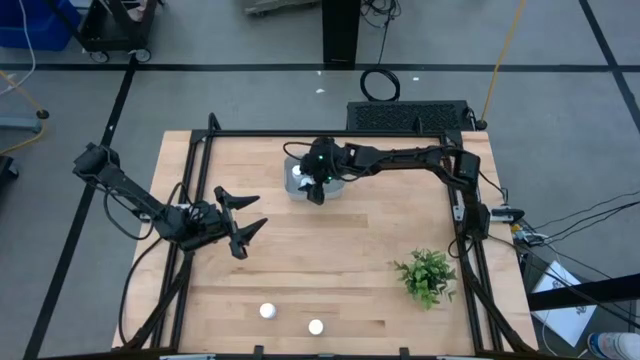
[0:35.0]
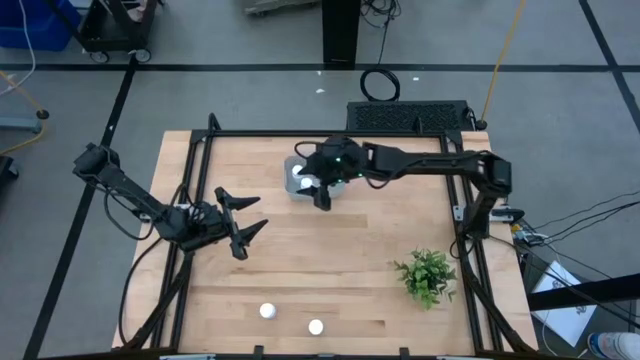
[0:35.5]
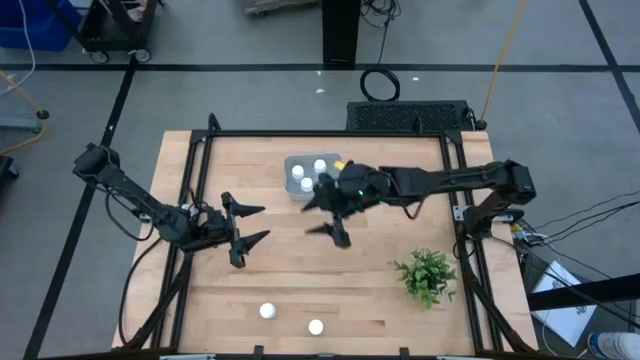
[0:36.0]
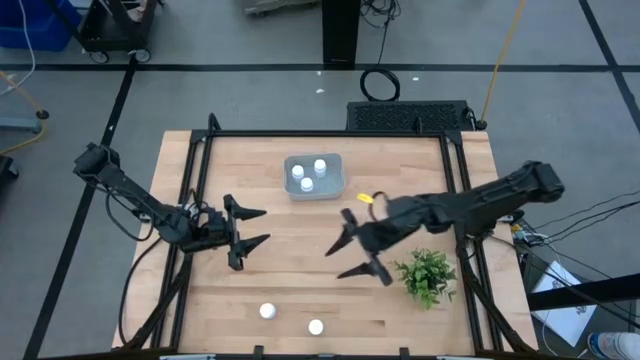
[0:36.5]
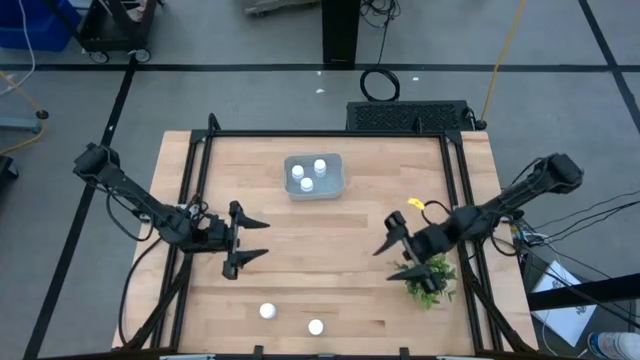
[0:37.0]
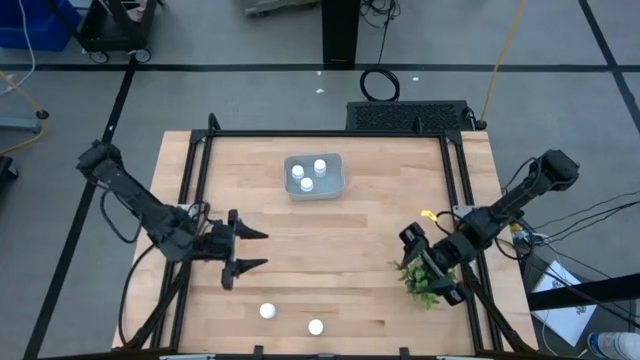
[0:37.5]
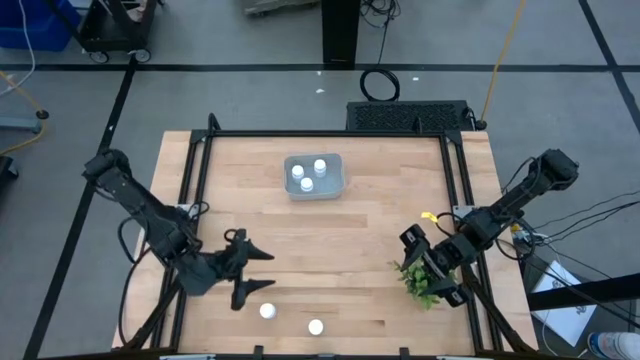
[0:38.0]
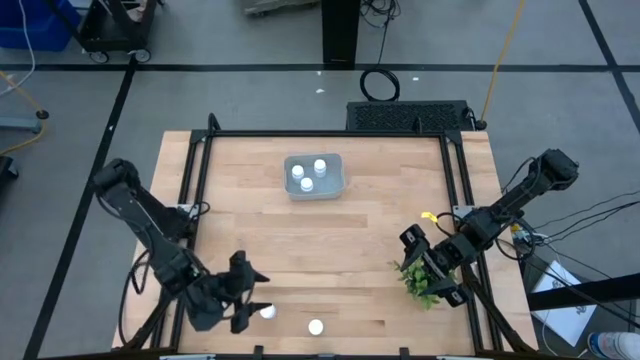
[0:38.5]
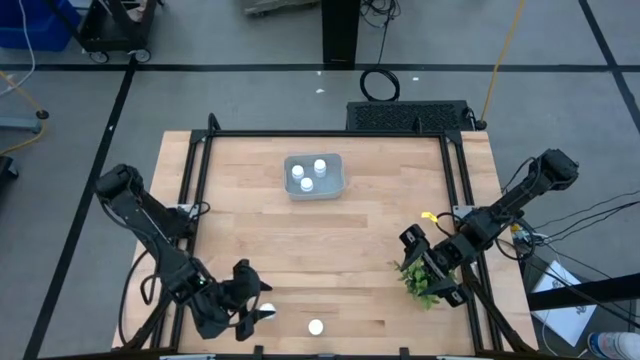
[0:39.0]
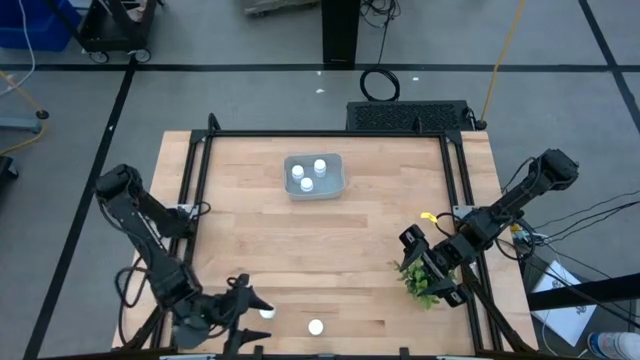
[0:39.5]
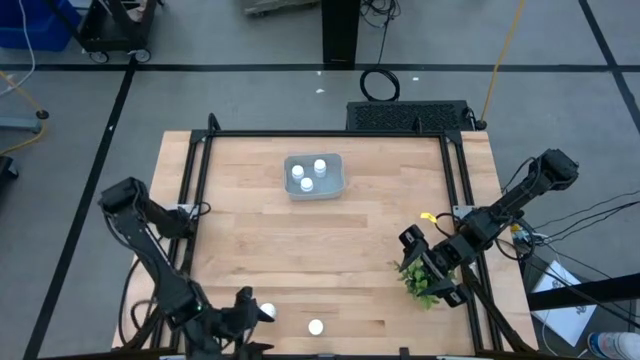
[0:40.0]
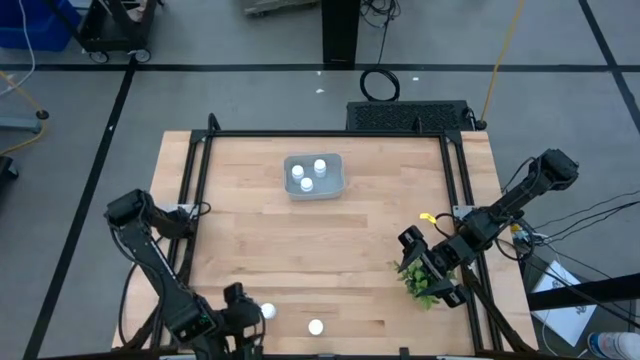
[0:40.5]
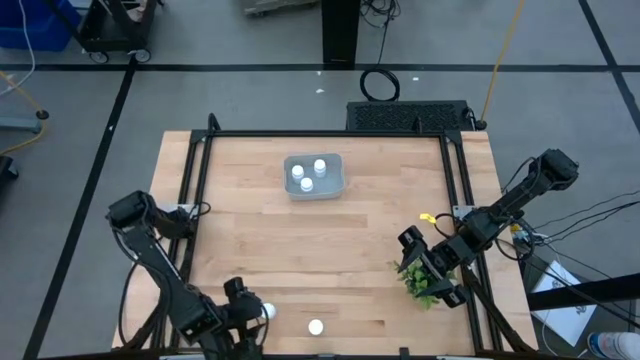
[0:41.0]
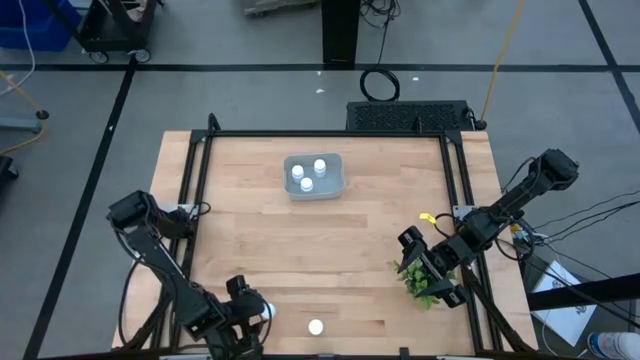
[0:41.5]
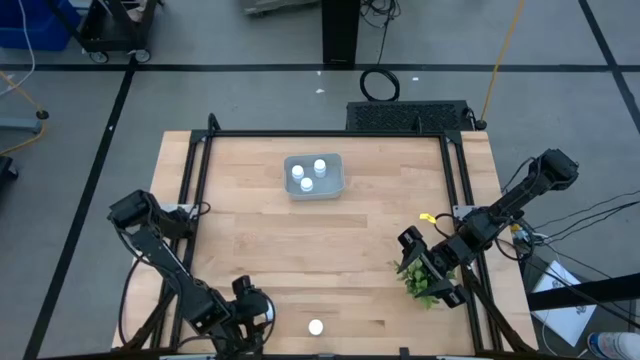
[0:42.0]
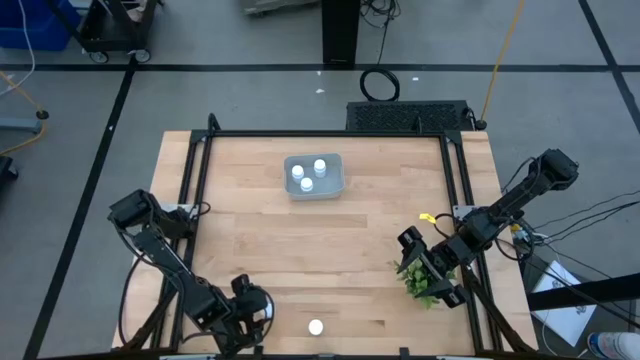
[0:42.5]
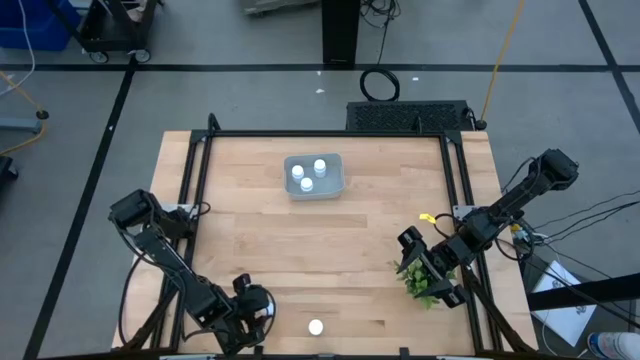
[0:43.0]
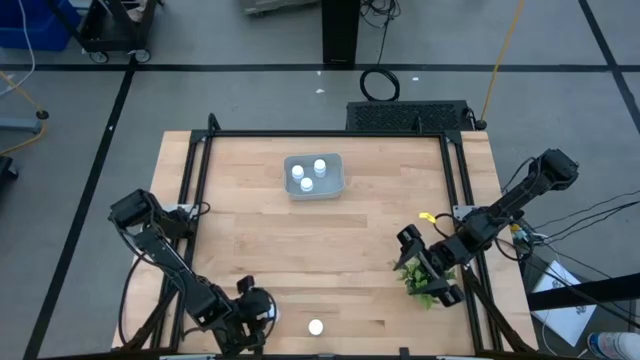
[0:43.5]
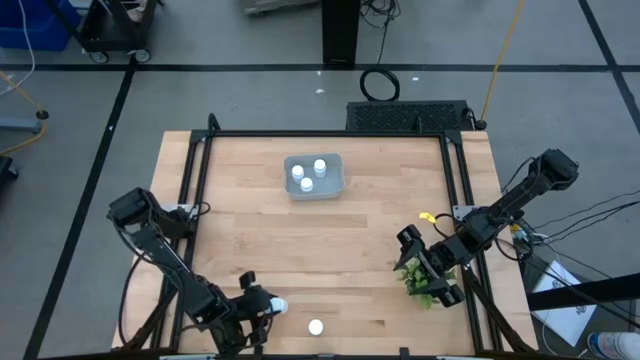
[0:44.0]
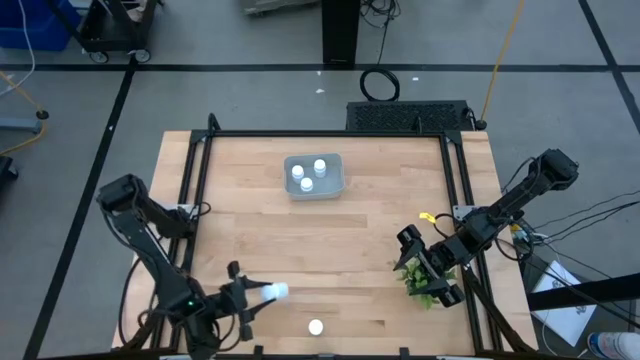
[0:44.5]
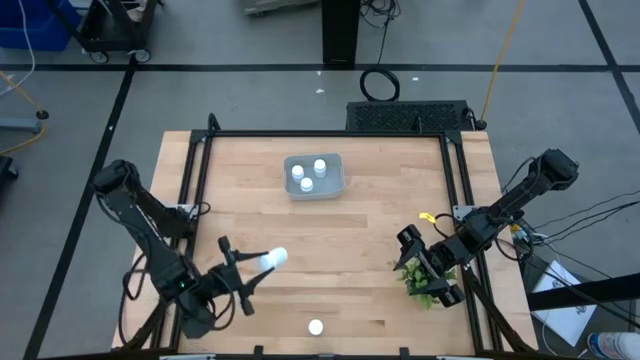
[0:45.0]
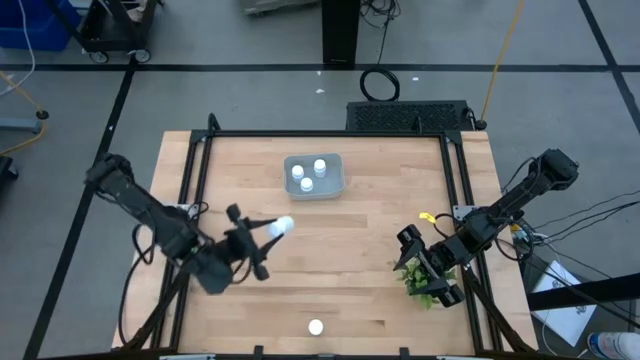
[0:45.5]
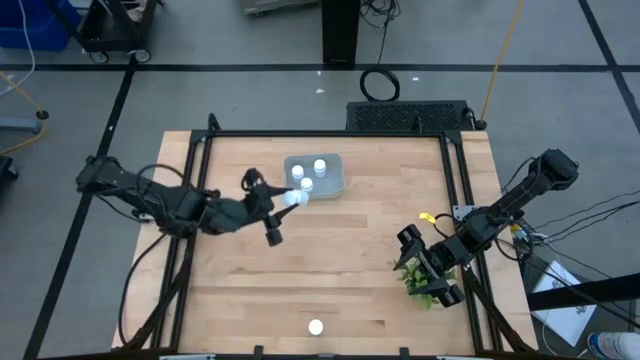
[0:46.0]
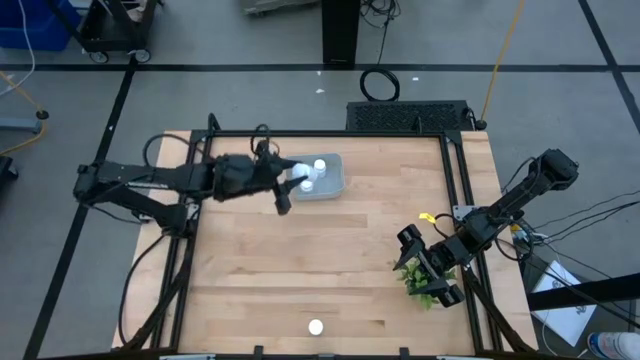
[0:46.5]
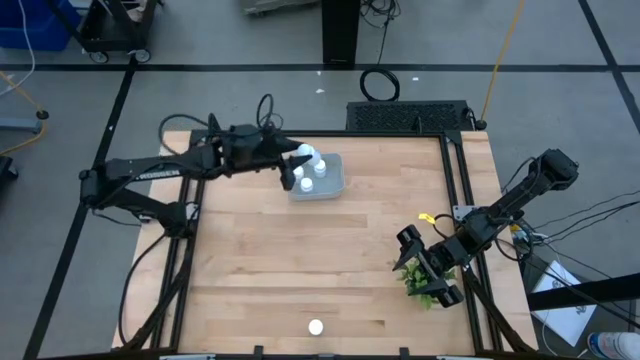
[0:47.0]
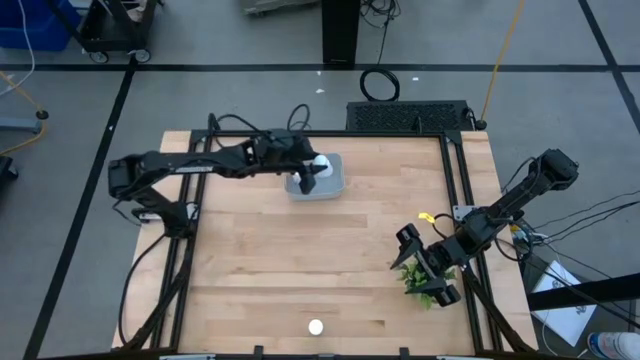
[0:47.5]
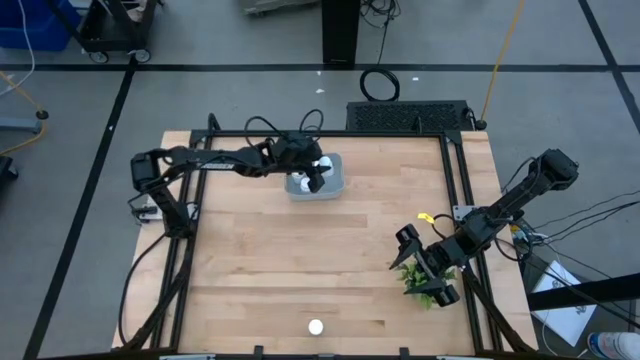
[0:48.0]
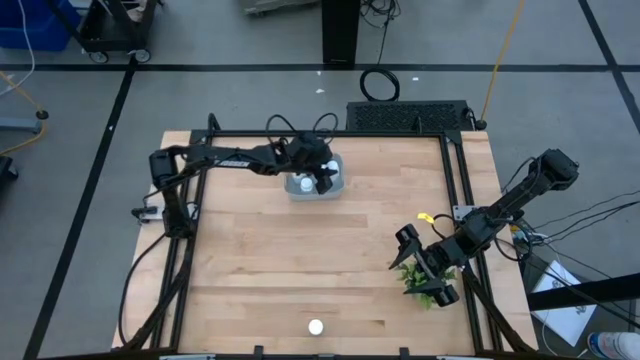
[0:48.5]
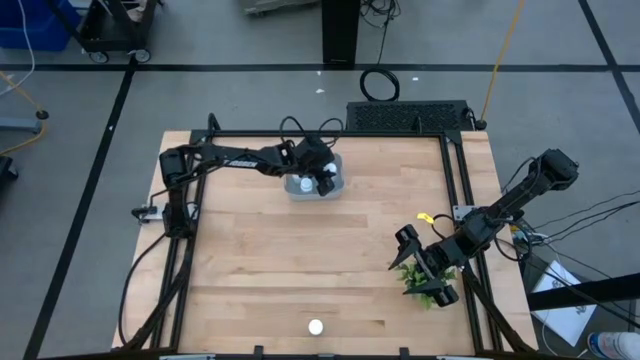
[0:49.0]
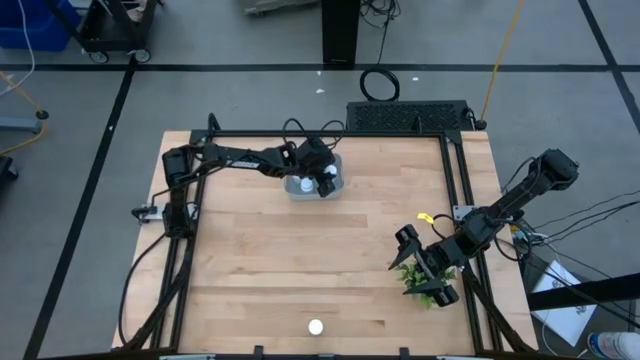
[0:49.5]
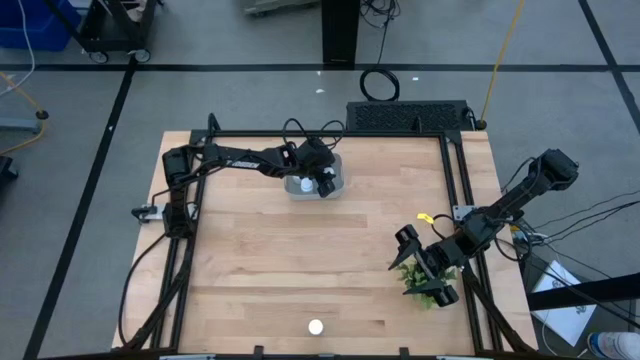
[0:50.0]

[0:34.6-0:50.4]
Task: Pick and place pill bottles into a basket
Put the white bottle into the gray bin

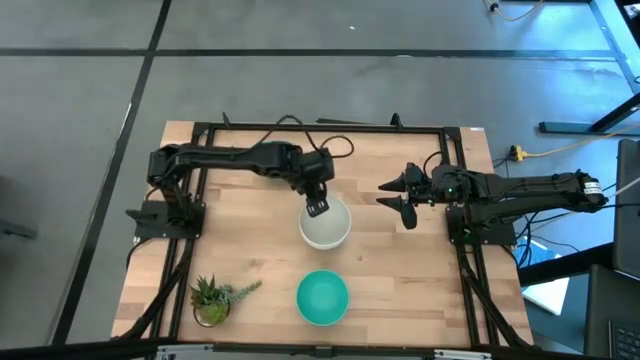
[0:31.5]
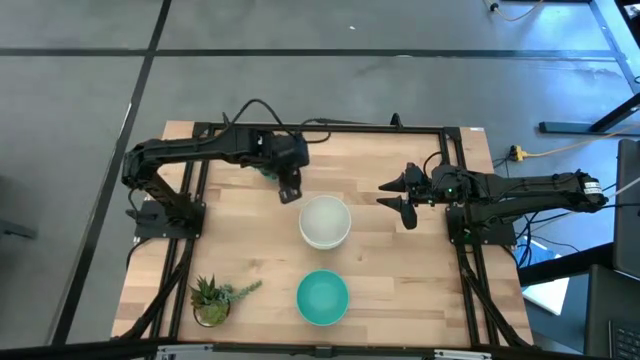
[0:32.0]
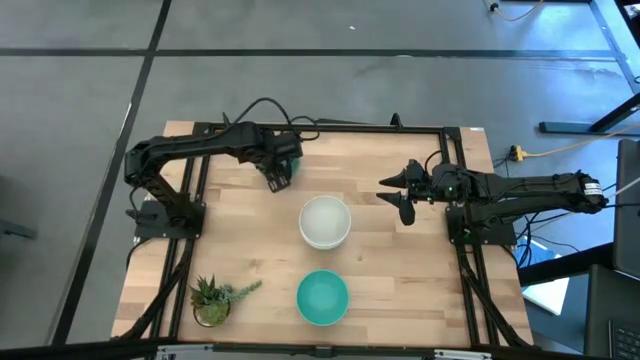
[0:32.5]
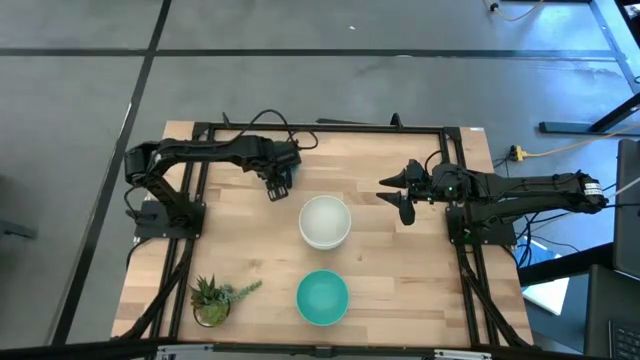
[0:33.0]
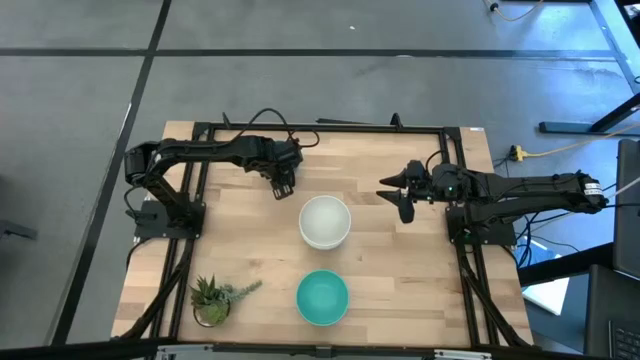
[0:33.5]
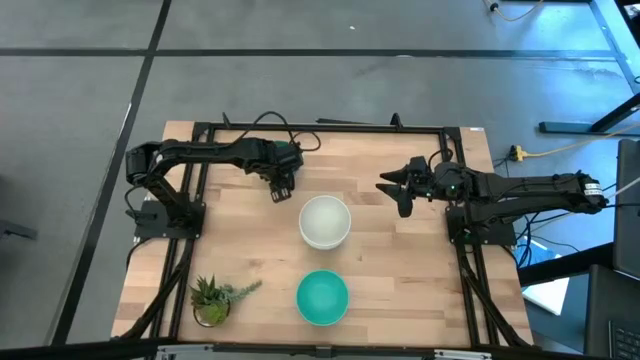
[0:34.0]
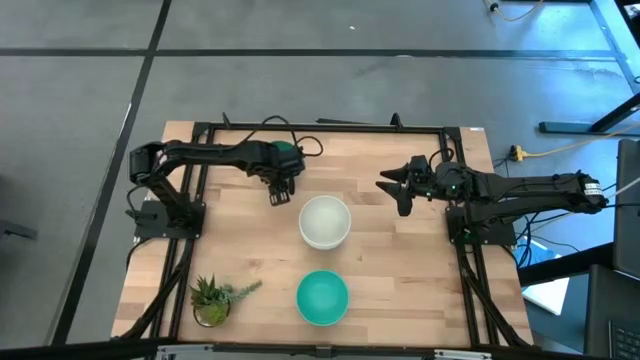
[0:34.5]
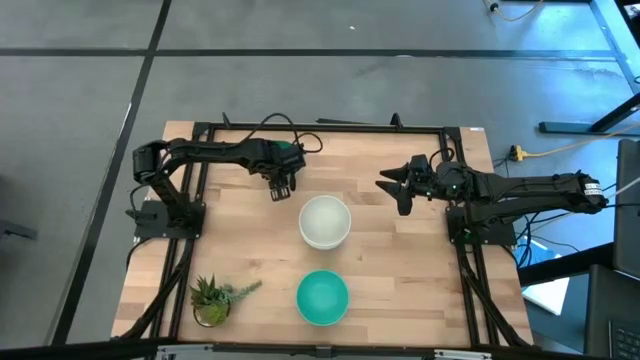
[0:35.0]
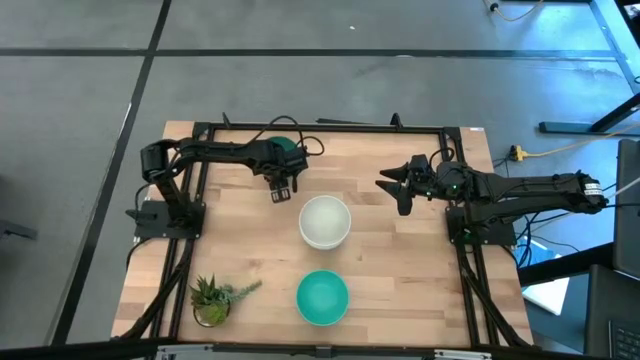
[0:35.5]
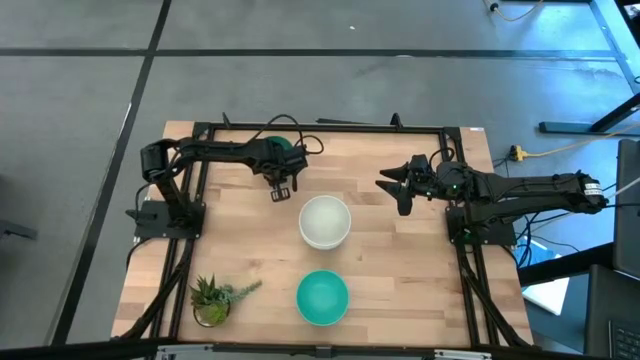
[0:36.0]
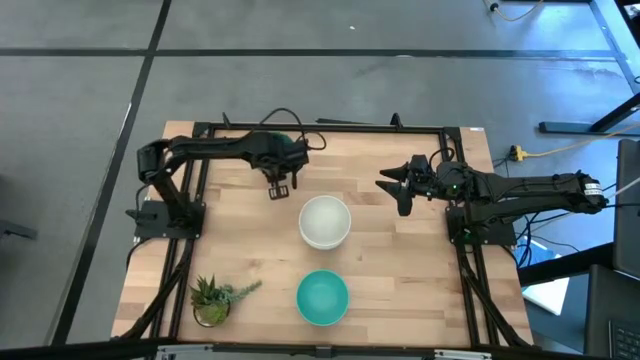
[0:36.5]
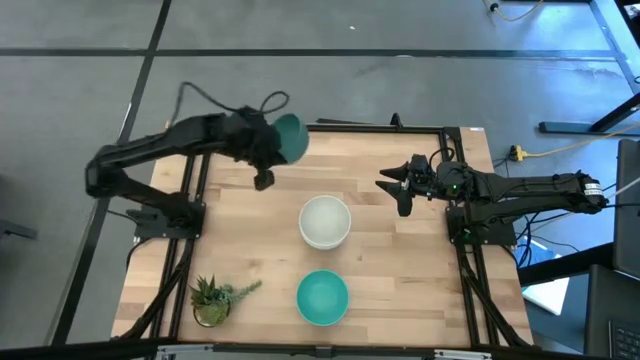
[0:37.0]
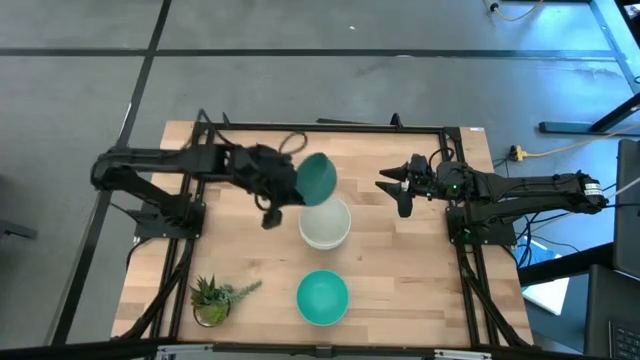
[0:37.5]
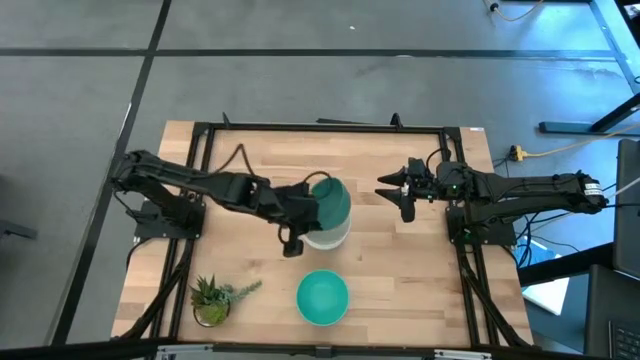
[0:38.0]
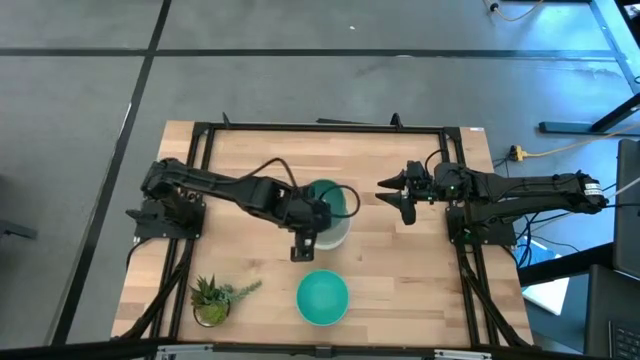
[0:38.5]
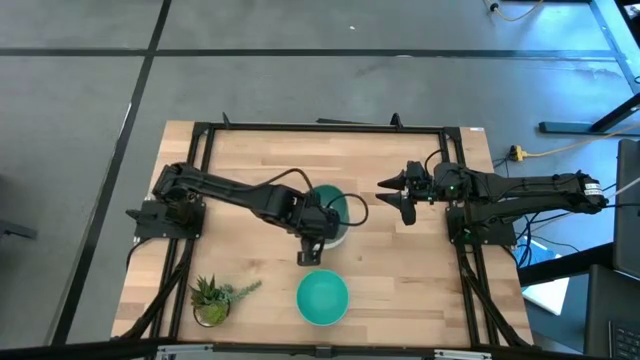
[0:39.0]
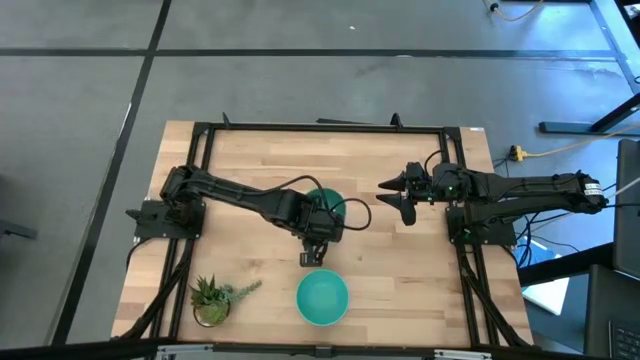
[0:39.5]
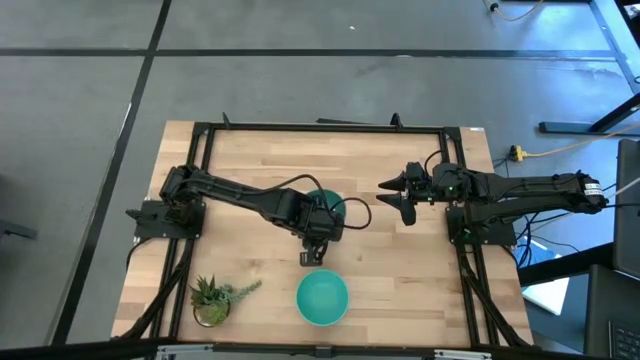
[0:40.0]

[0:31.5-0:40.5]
Task: Nest bowls inside each other
Stack the blue bowl on the white bowl
